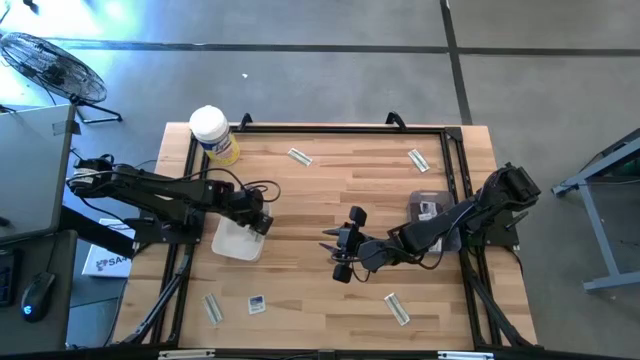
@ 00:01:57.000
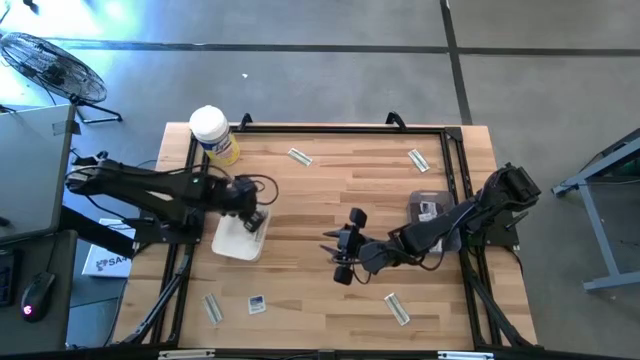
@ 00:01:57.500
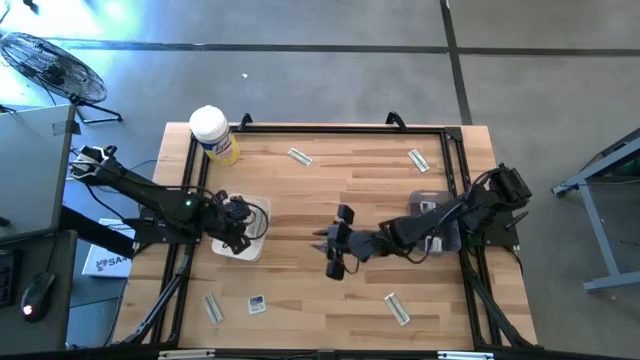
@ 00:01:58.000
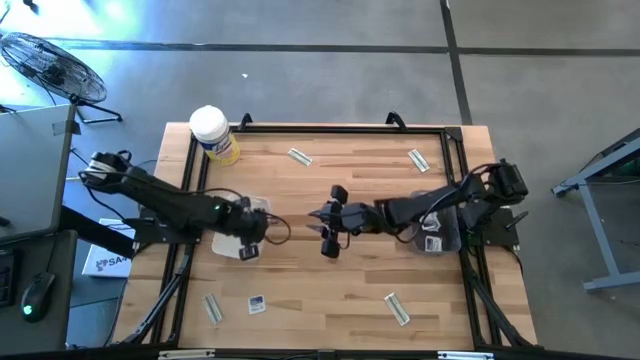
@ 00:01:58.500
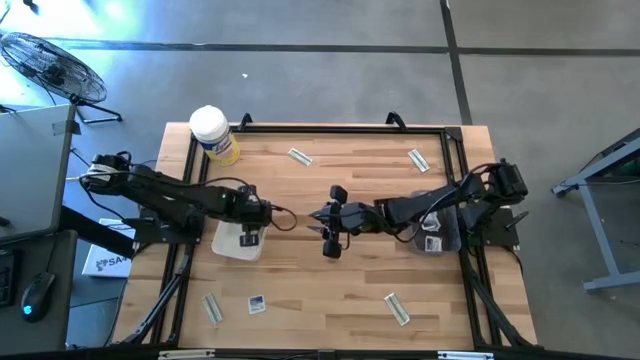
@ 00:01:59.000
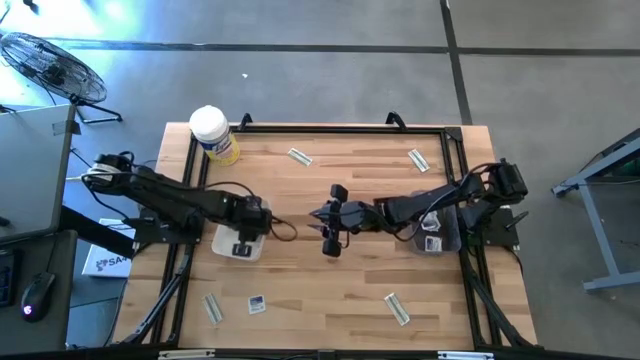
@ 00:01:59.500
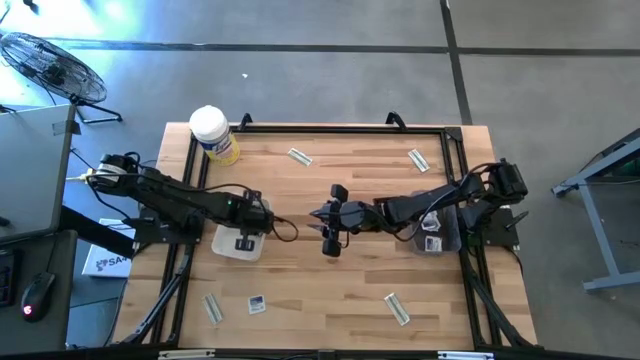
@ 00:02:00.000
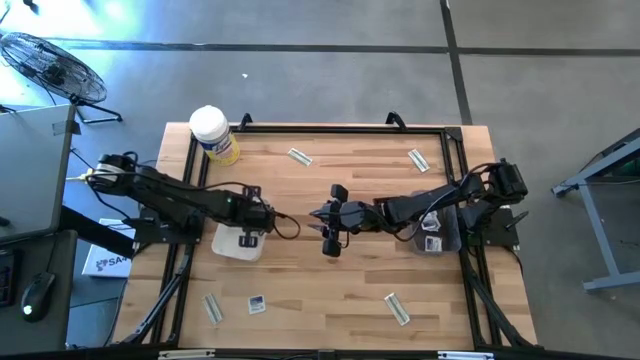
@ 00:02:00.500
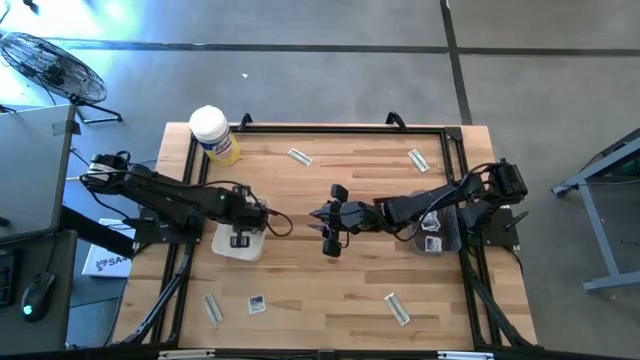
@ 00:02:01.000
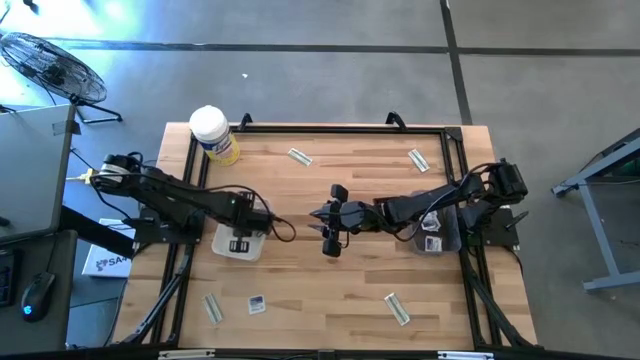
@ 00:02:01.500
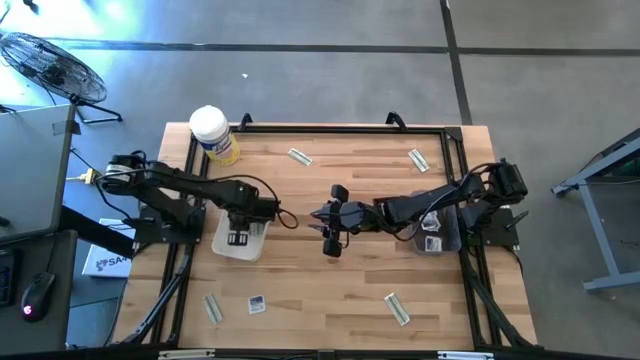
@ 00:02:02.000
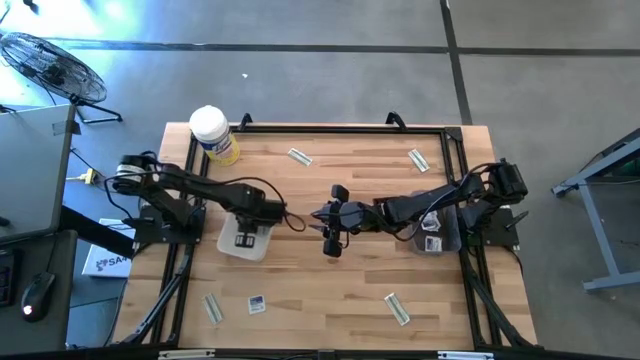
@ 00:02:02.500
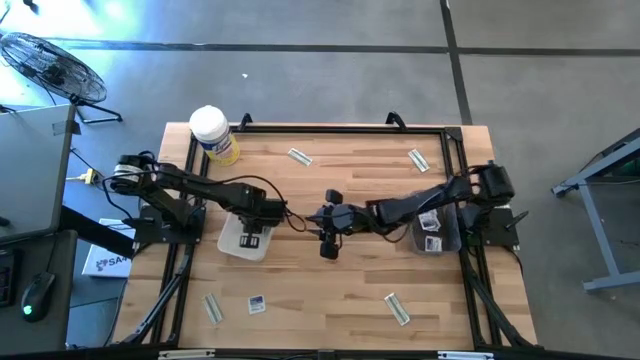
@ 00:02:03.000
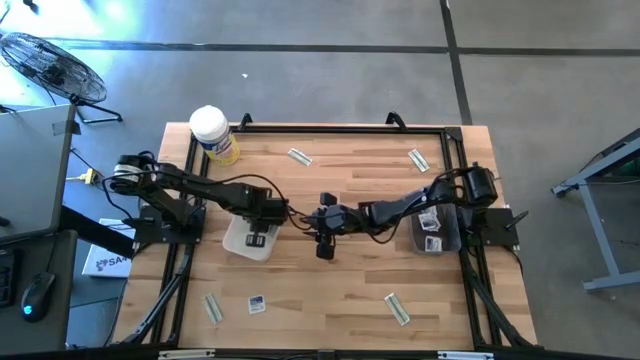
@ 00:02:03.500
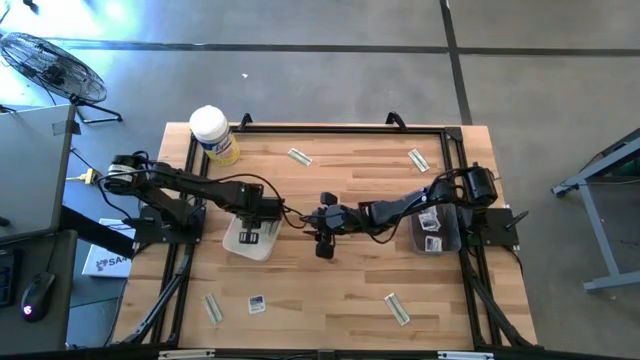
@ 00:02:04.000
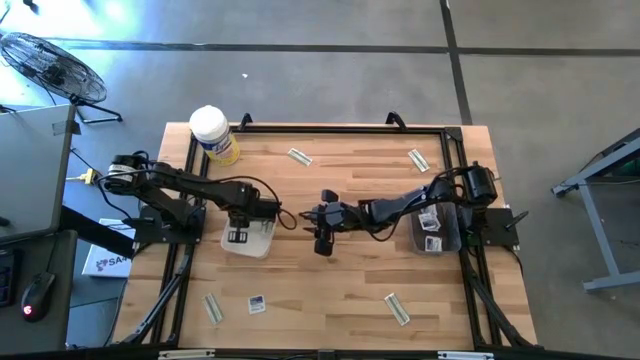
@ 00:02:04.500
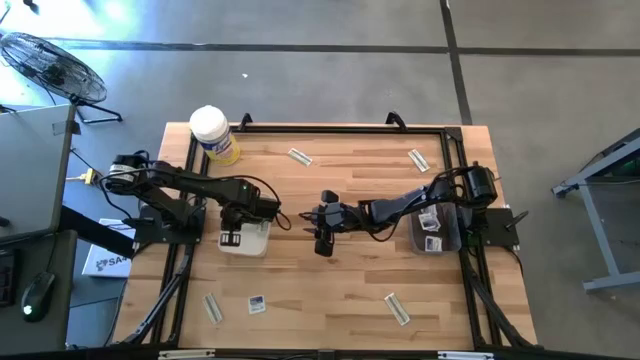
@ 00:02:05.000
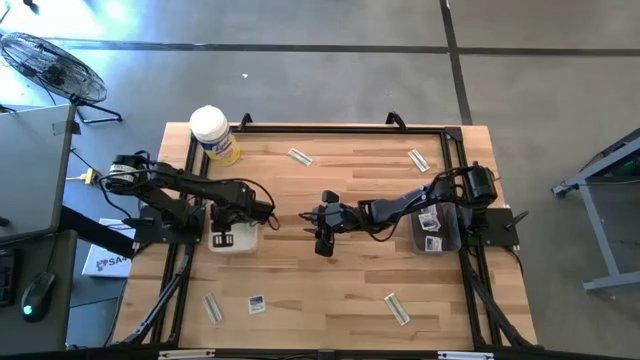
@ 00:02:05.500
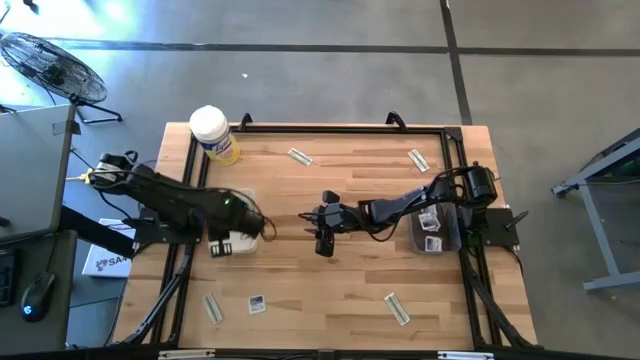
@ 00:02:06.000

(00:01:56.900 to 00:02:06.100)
Task: Pick & Place First Aid Supplies
Adjust the green bandages in the white bin

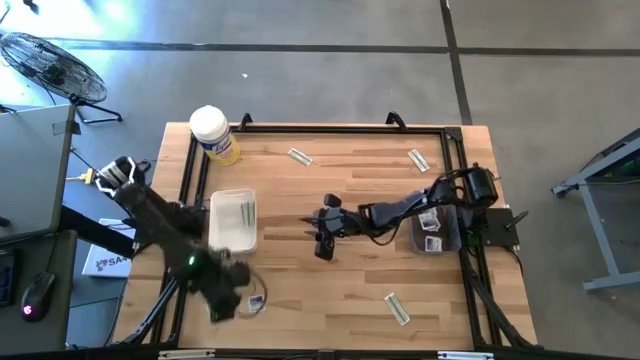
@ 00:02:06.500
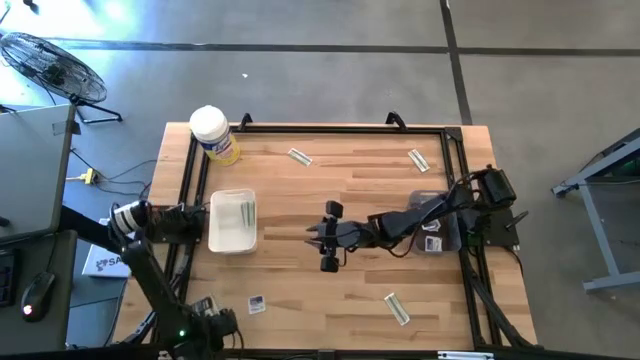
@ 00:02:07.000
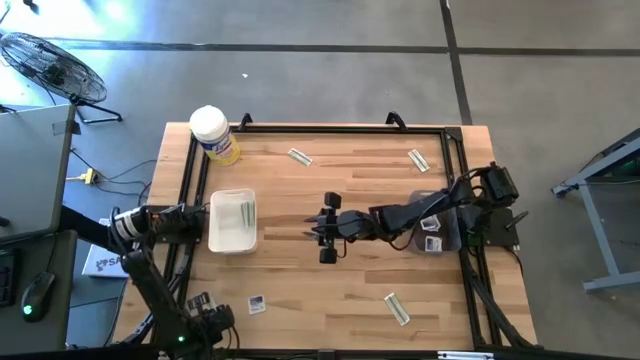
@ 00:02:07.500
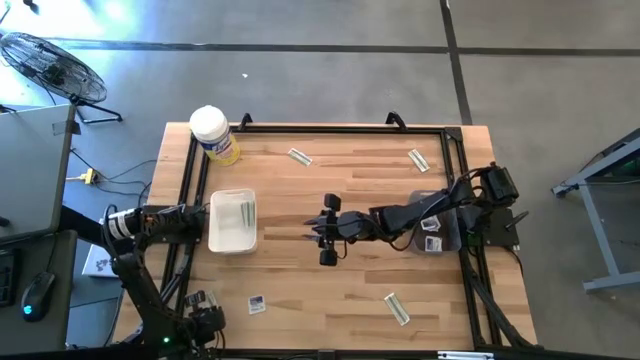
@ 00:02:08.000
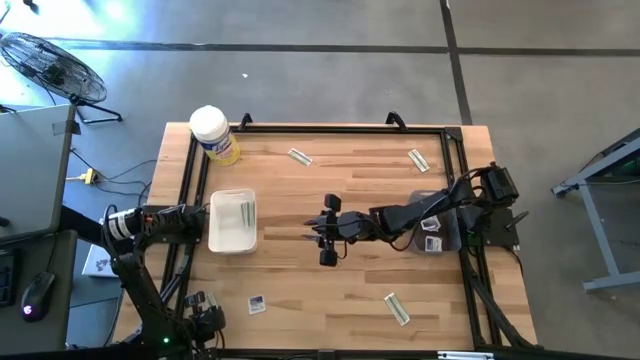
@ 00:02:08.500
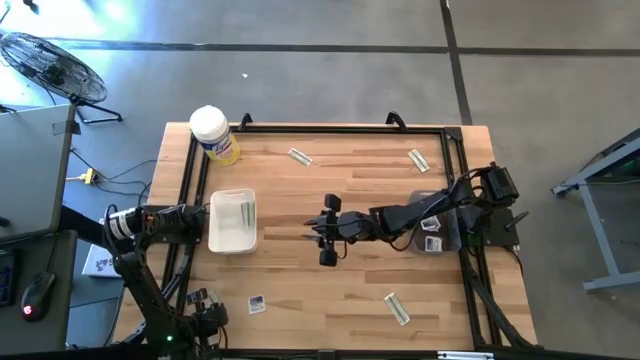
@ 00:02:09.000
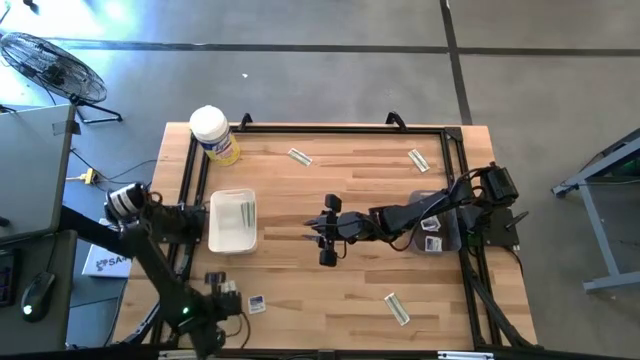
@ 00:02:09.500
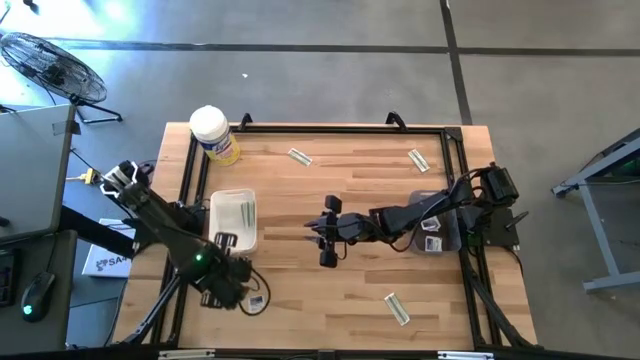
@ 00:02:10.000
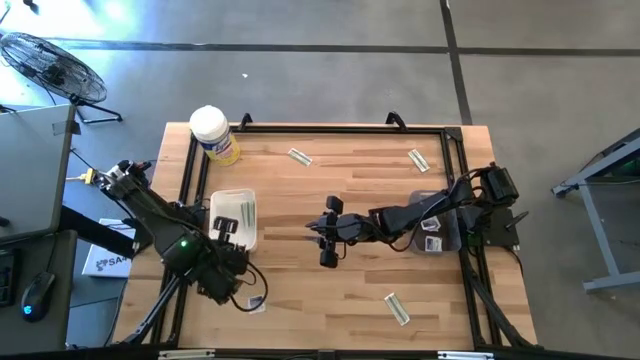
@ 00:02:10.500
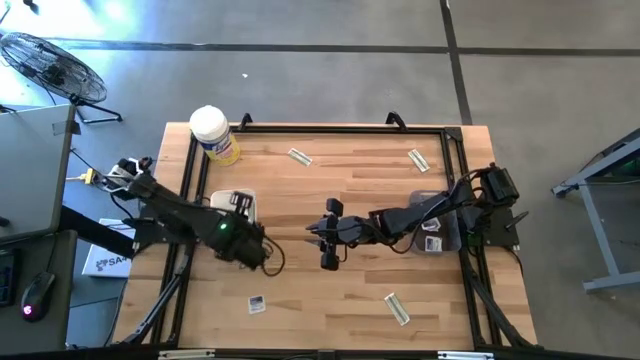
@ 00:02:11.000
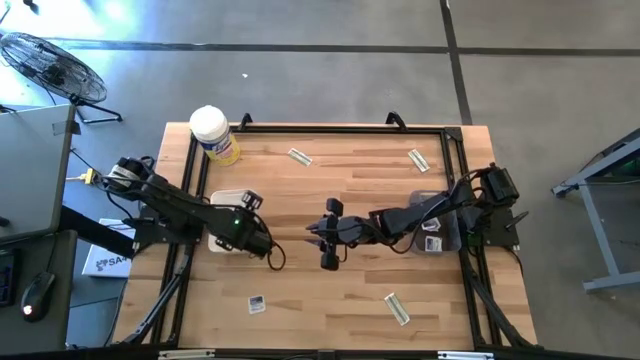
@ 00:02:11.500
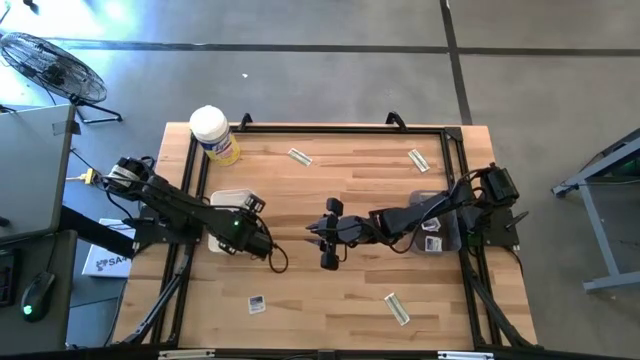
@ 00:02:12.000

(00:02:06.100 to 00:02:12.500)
Put the green bandage into the white bin

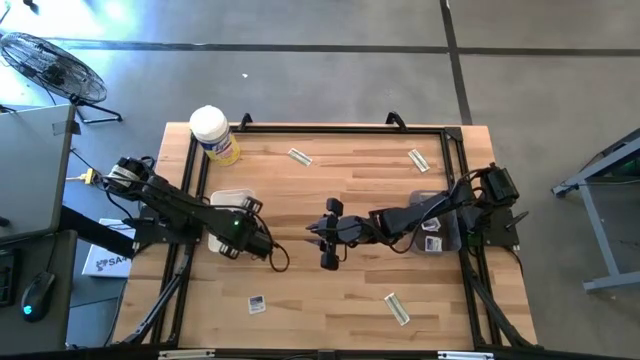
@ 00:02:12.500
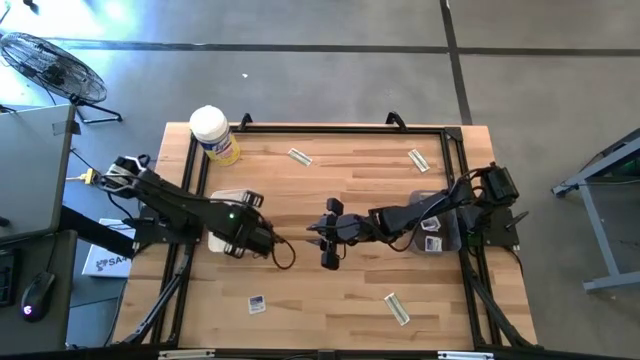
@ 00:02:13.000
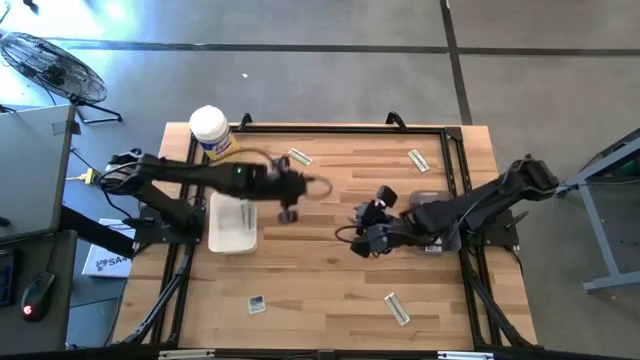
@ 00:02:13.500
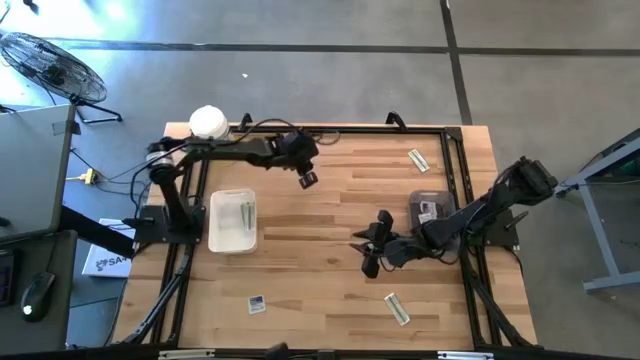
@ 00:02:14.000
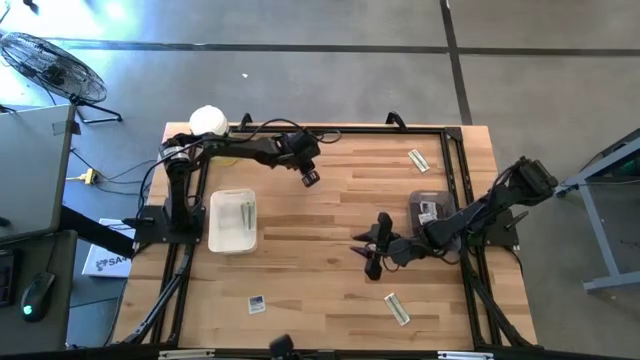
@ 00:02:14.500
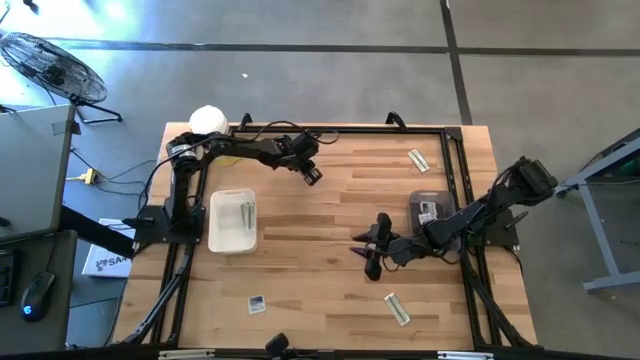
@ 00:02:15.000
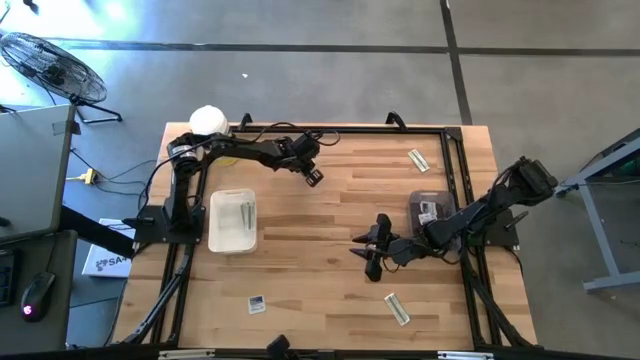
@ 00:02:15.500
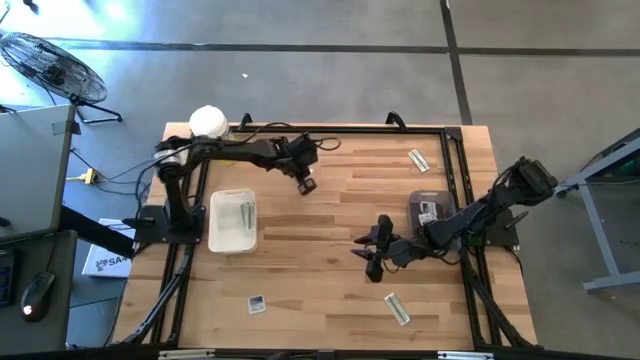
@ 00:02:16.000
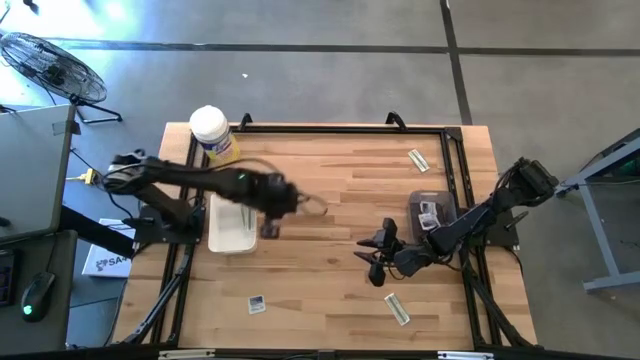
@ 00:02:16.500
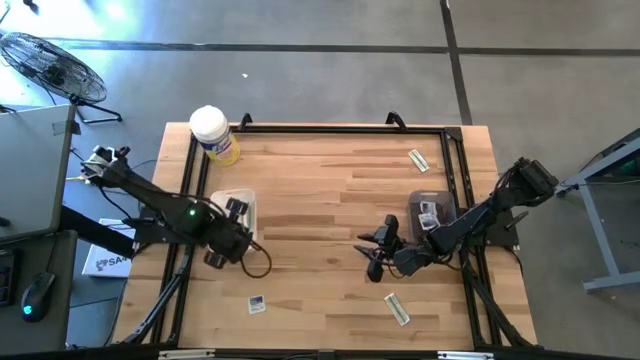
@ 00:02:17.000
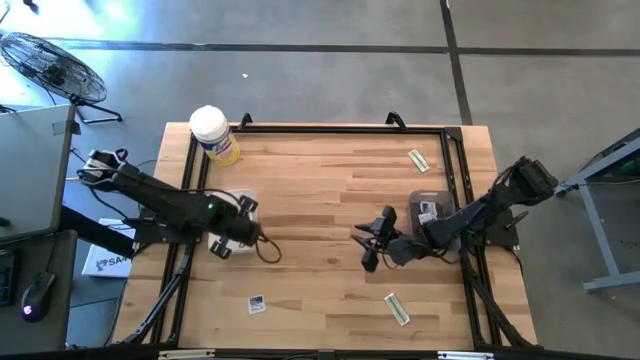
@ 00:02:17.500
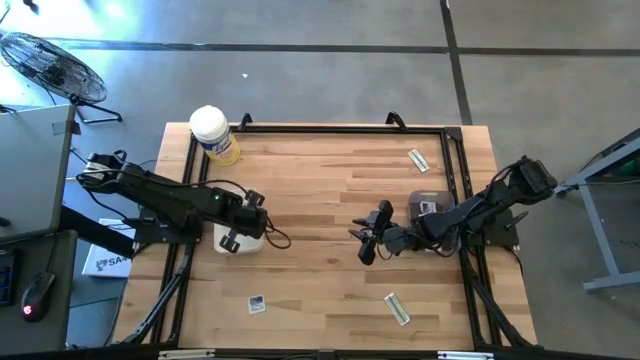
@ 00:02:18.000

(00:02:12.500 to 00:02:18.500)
Put the green bandage into the white bin
